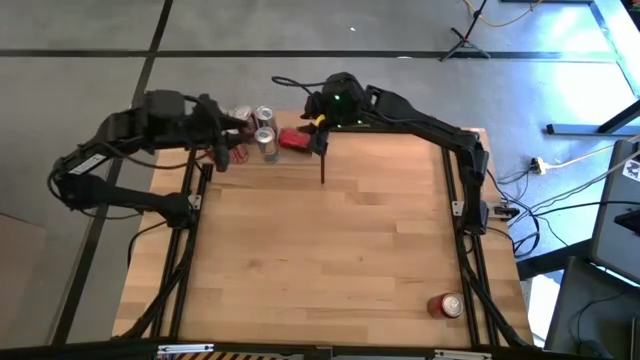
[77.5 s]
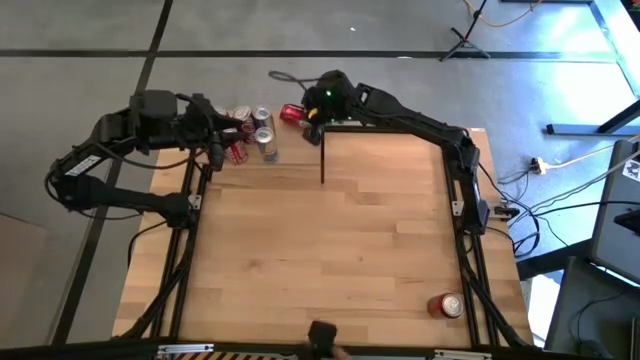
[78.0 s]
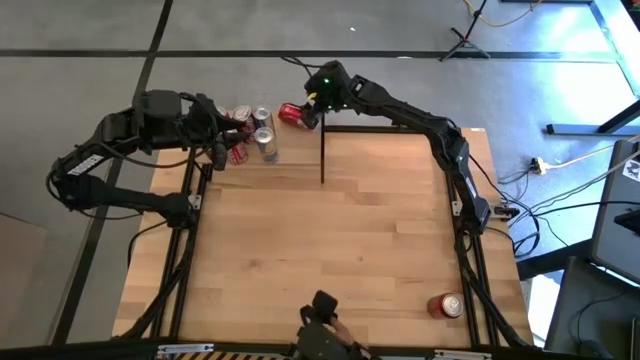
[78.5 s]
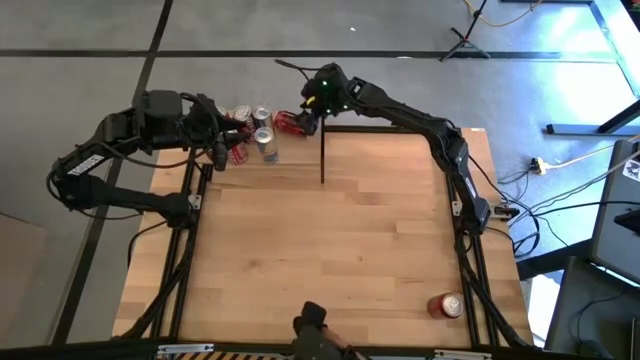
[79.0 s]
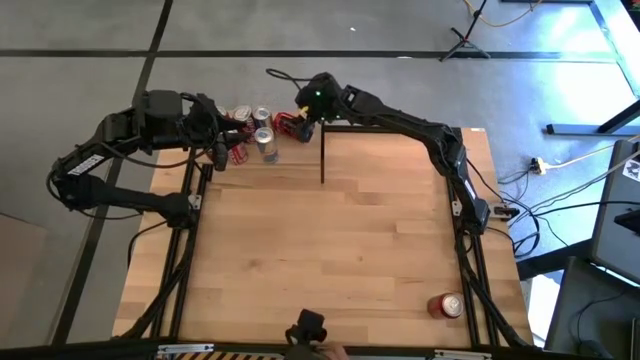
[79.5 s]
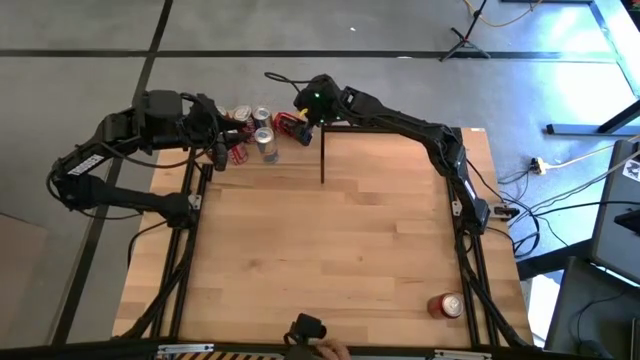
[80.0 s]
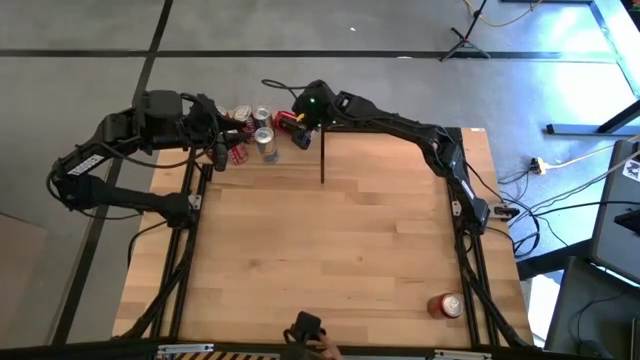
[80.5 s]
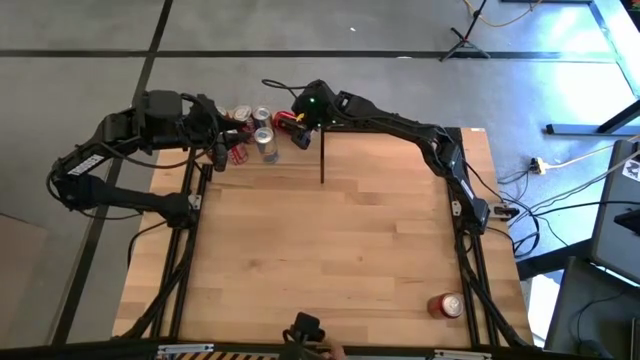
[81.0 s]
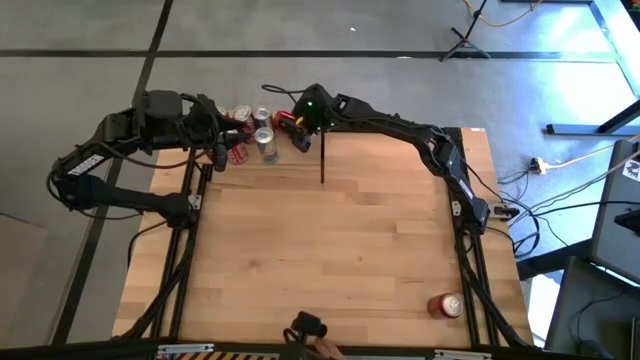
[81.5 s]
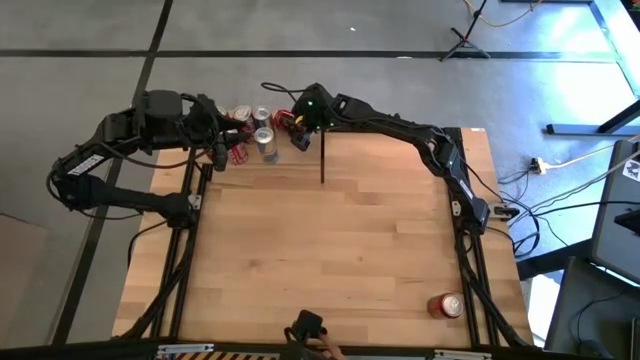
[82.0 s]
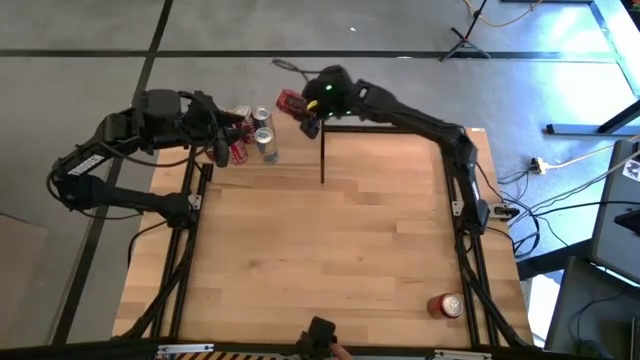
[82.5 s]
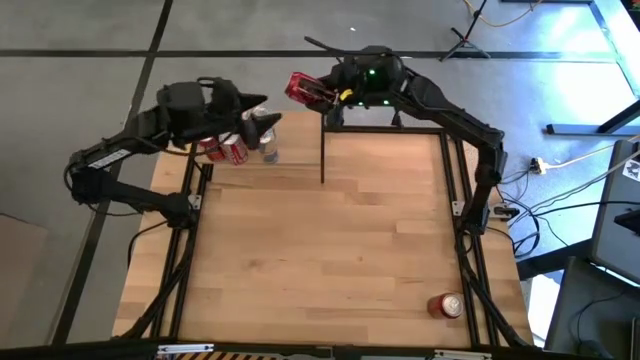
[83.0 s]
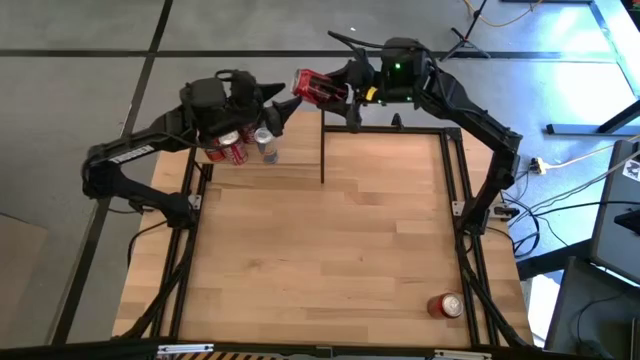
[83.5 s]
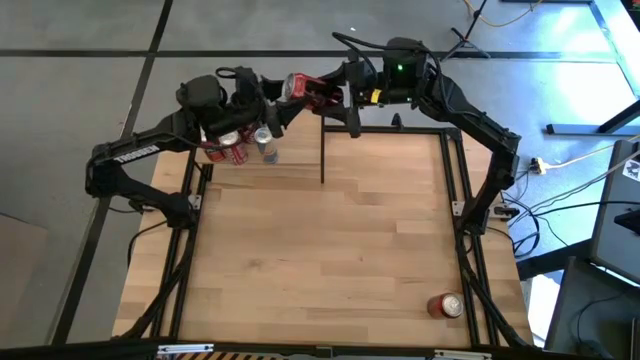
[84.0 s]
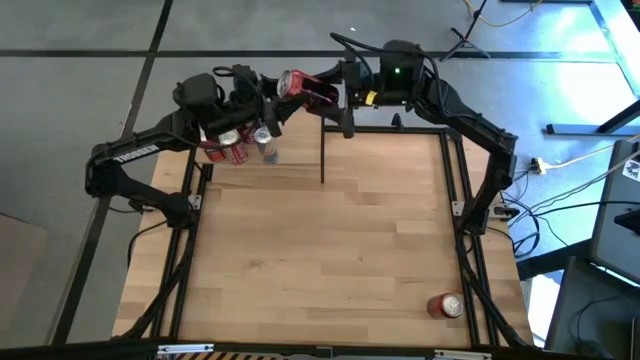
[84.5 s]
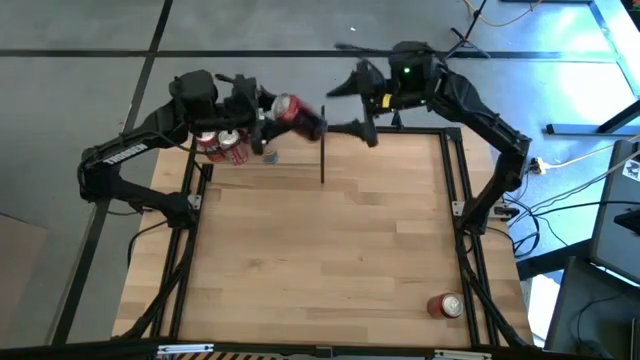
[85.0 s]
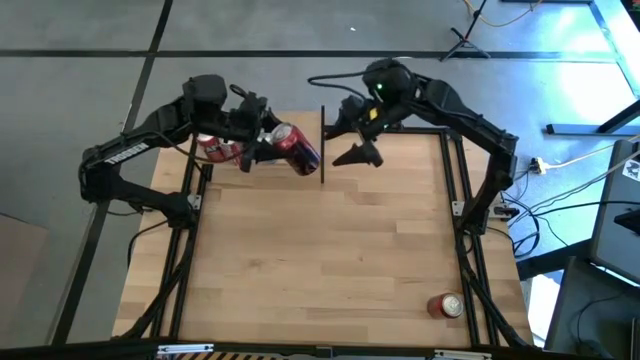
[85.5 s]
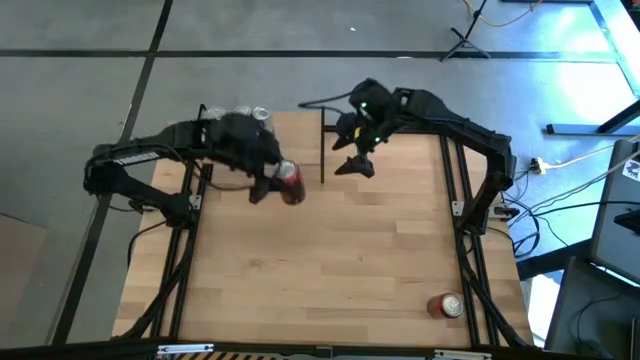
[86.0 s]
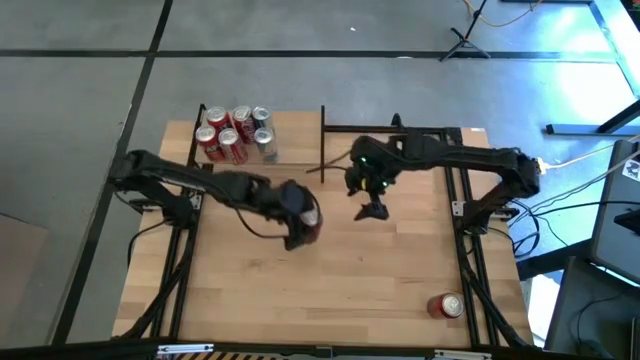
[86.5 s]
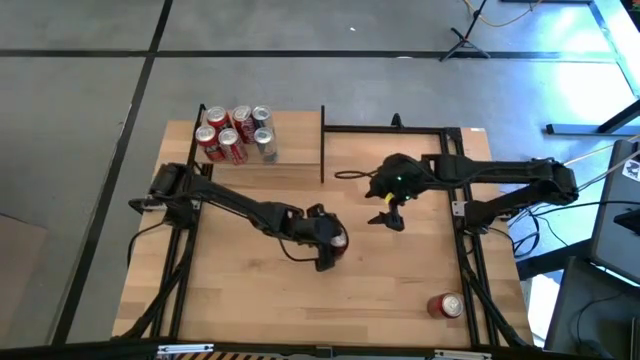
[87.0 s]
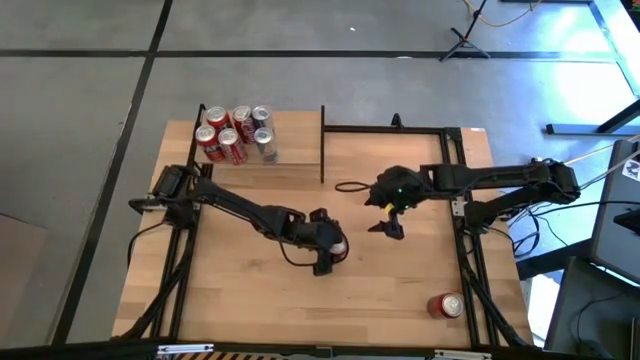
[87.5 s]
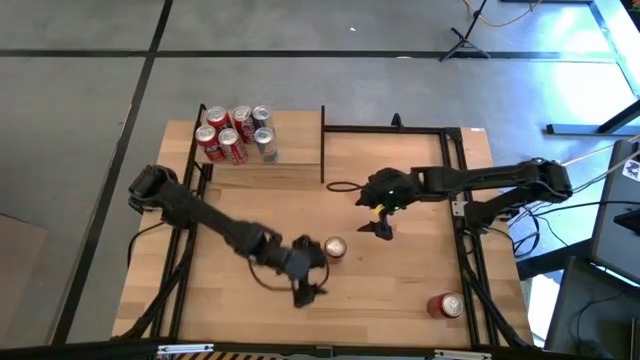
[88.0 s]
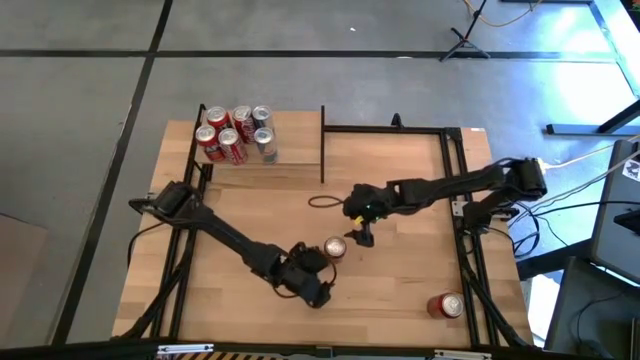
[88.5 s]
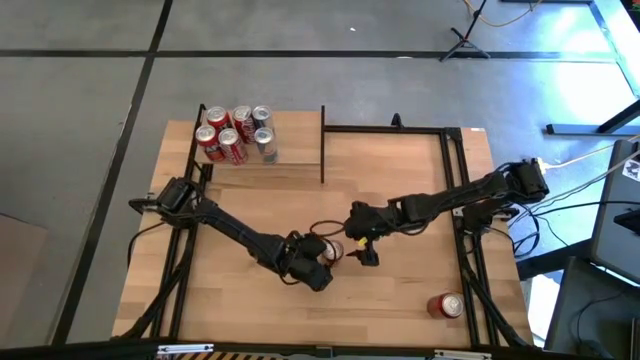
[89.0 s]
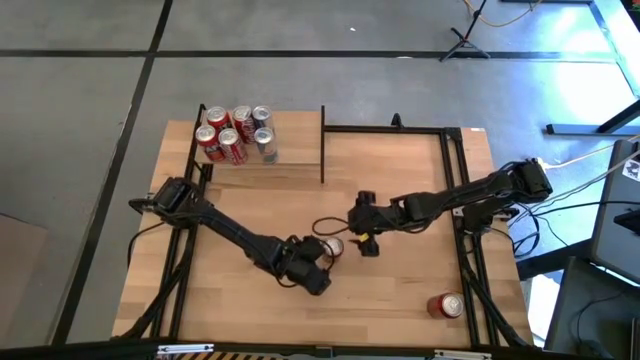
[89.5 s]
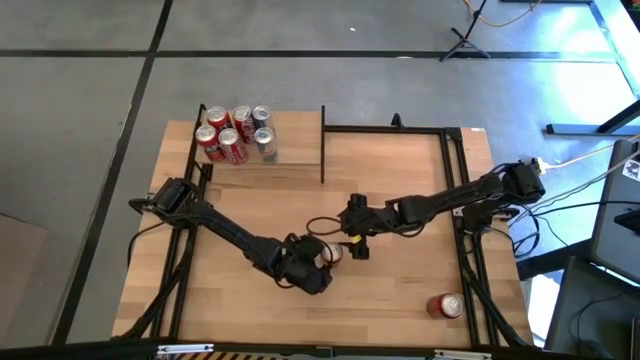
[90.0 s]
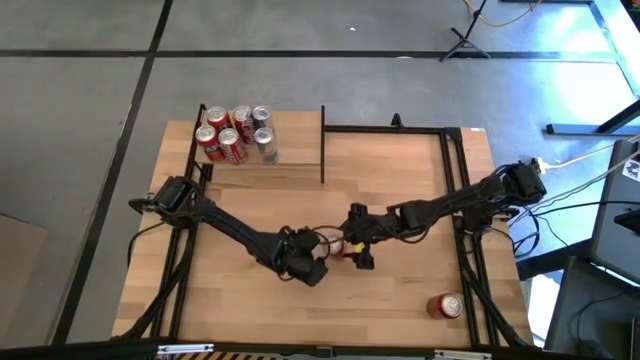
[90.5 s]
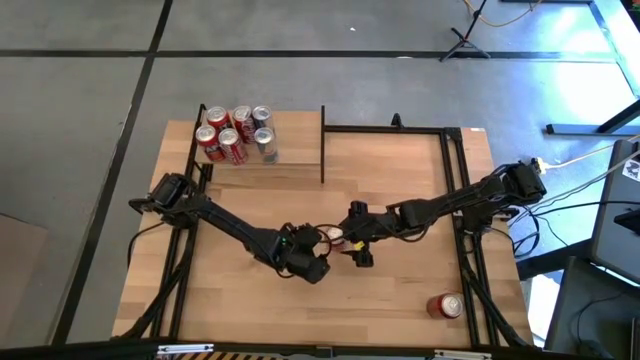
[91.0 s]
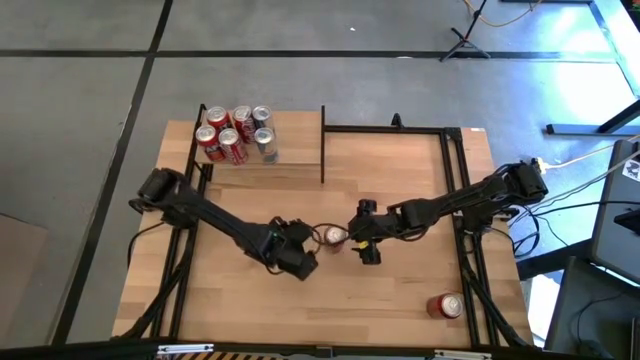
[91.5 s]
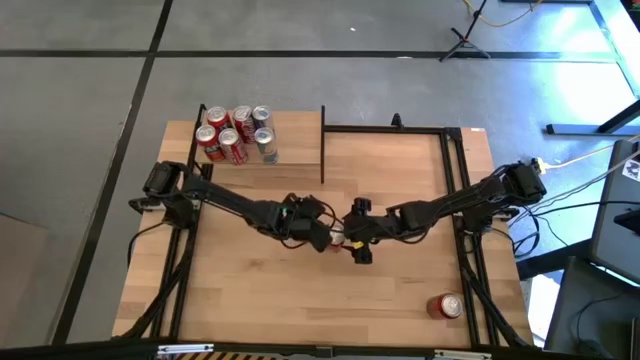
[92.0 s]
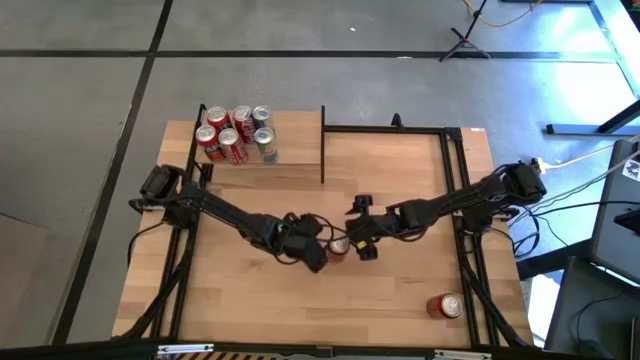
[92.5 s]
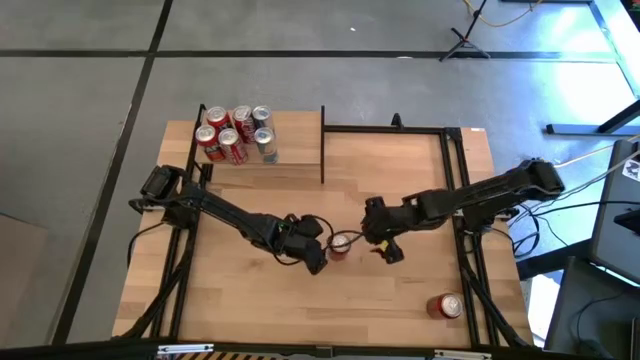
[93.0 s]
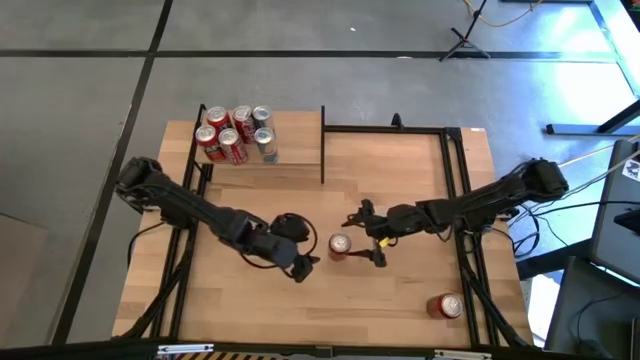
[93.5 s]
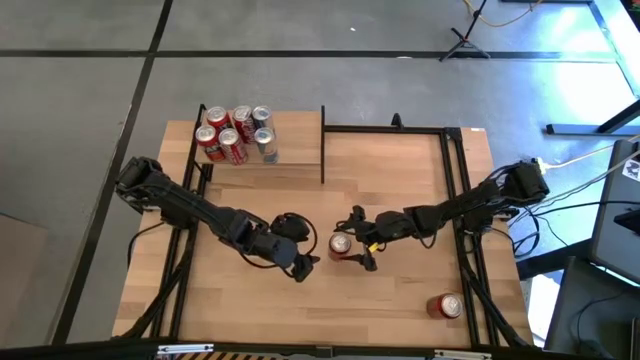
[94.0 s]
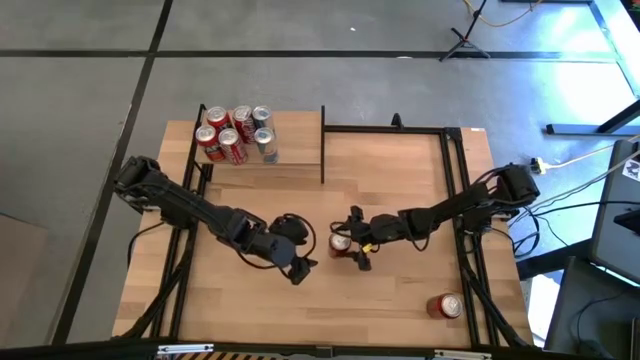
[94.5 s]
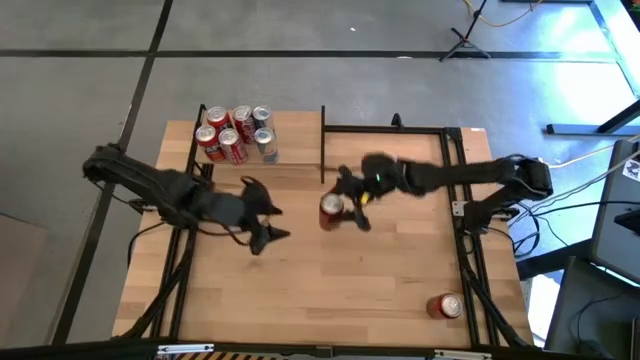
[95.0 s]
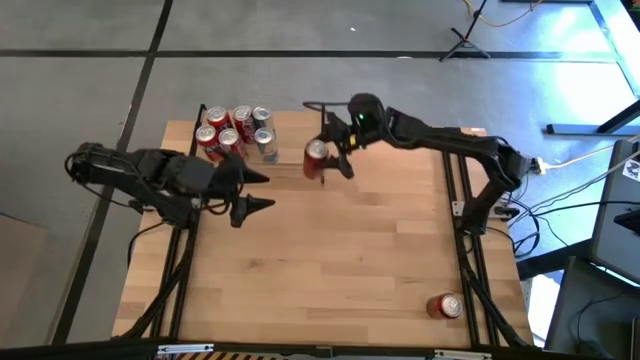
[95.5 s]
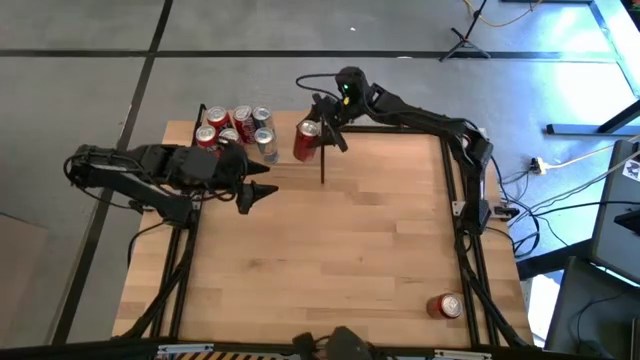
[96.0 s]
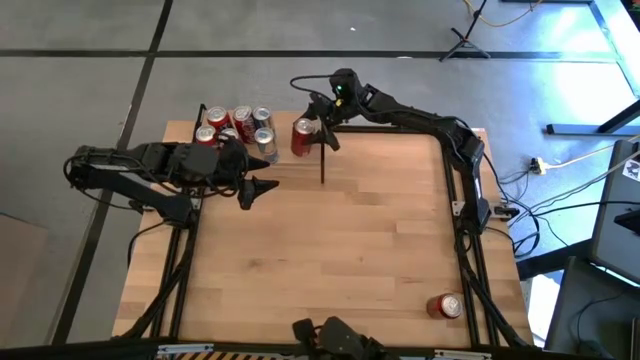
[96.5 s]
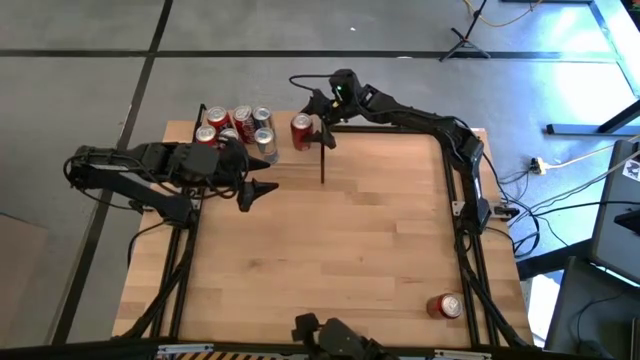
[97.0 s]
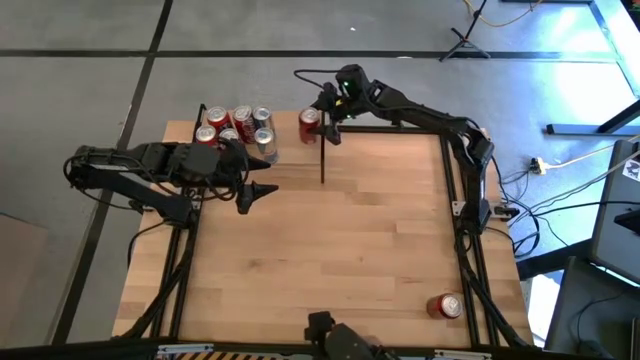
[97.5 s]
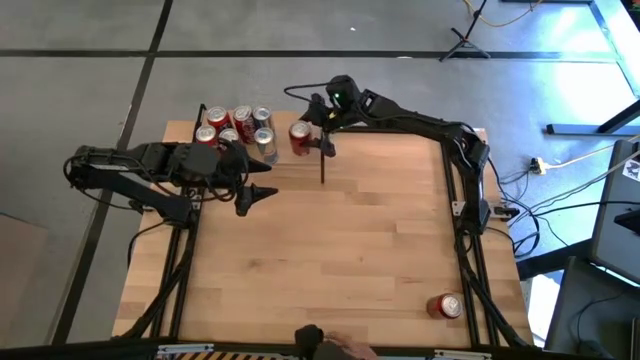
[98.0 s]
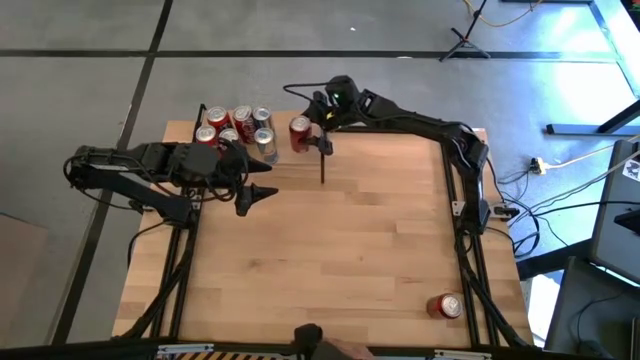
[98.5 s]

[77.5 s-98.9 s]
Task: Place canned beverage on shelf
Put the top red-black soda can on the shelf

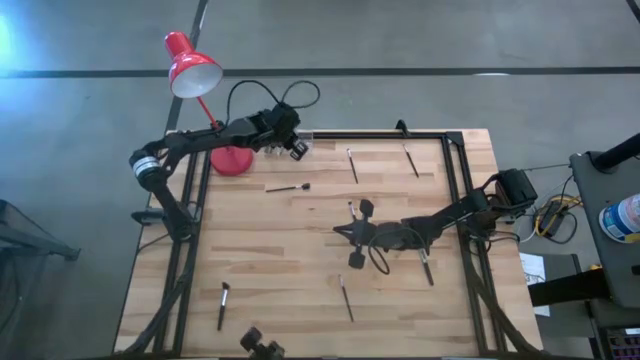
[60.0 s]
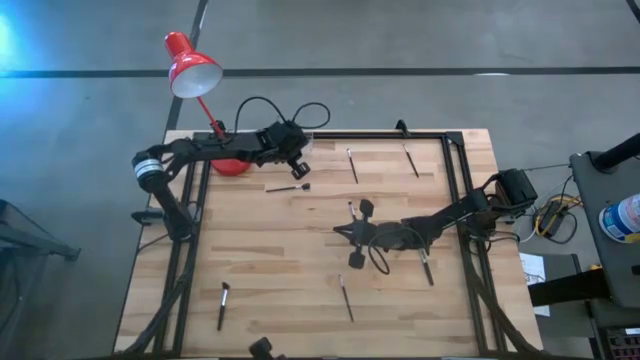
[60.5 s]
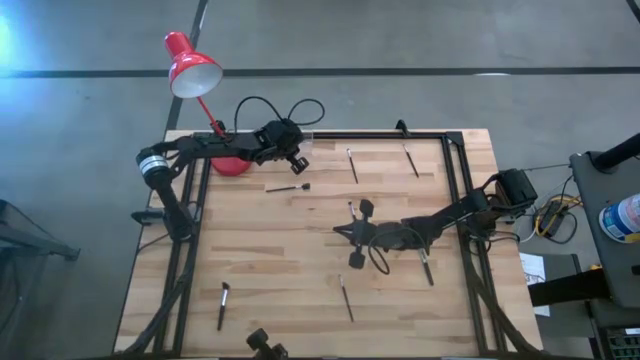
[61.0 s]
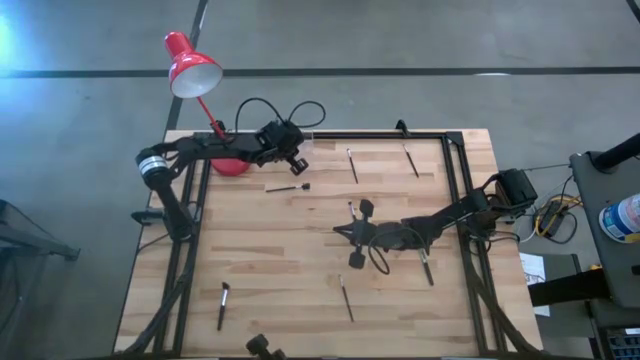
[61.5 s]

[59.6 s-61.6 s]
Task: Pick & Place Makeup Supplies
Adjust the transparent organizer on the table
